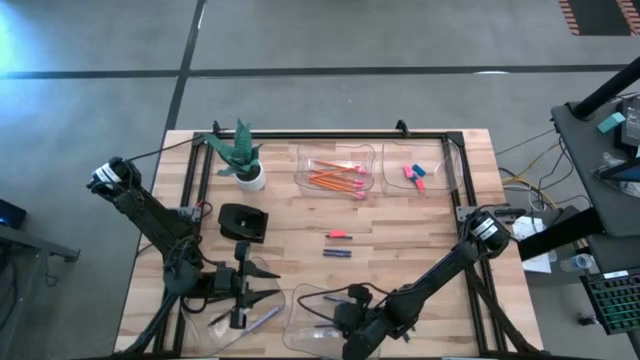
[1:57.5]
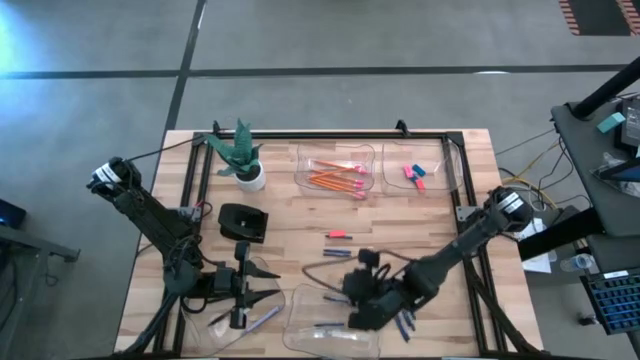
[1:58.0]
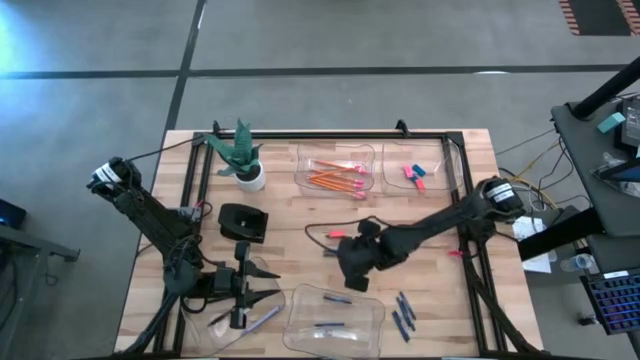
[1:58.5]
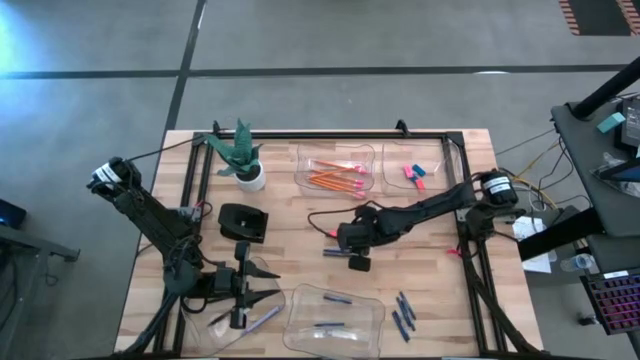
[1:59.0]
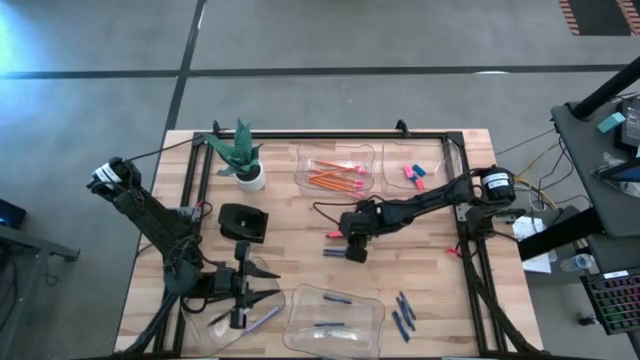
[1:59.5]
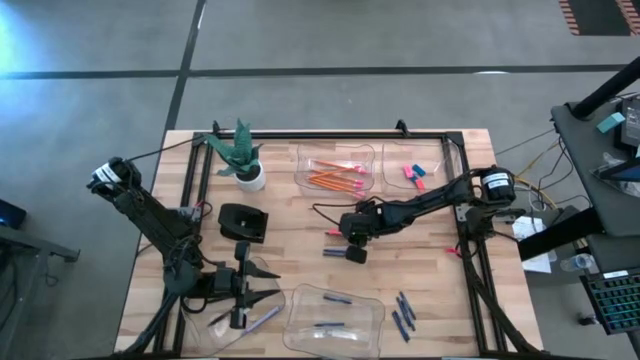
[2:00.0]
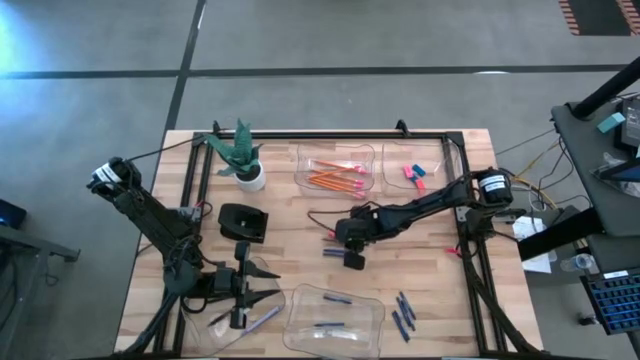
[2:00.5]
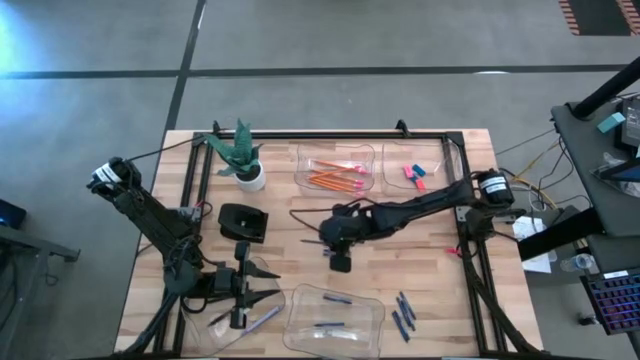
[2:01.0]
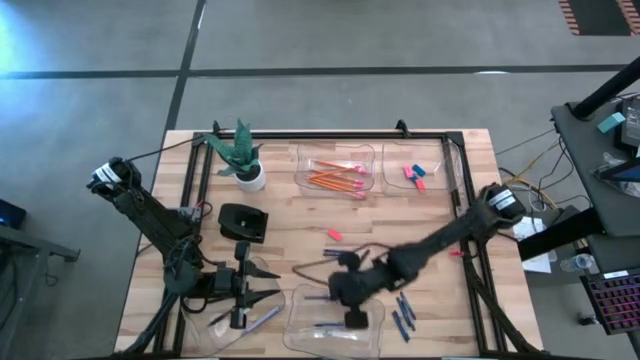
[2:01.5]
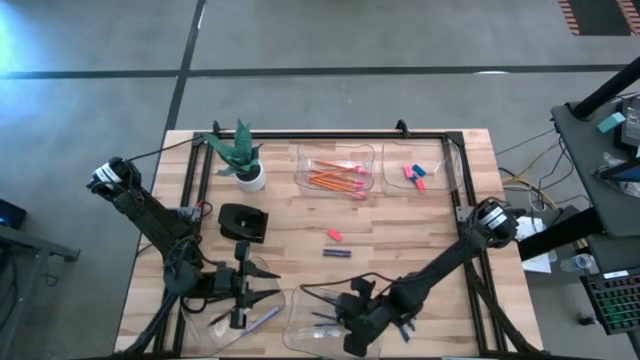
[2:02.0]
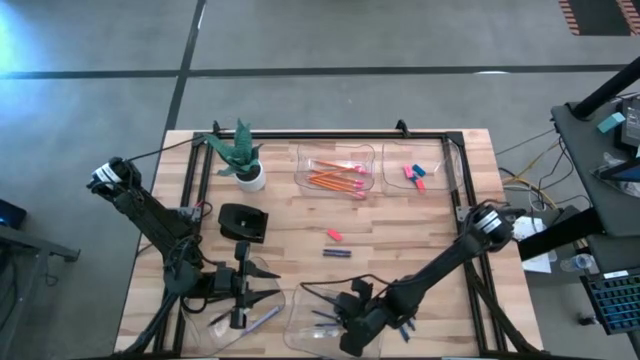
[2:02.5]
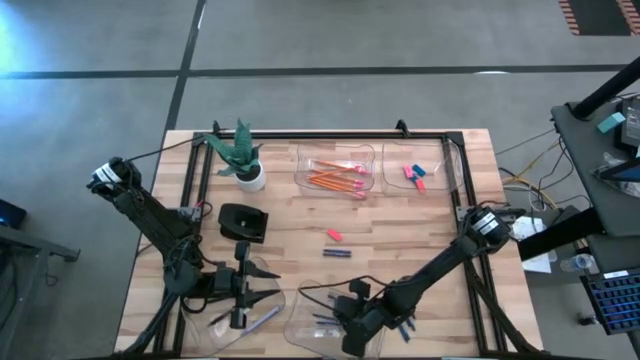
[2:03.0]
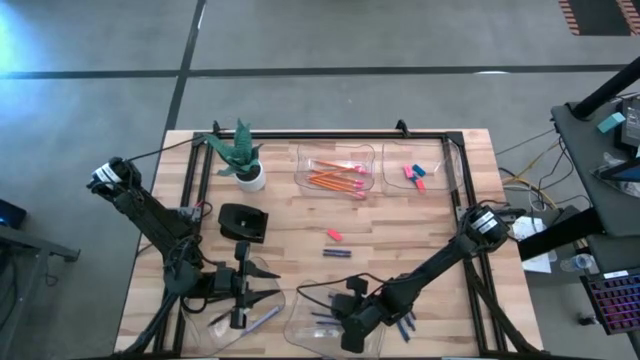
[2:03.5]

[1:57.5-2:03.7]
Task: Sort crayons/erasers/pens/pencils in bins
Put the blue crayon into the bottom right transparent bin

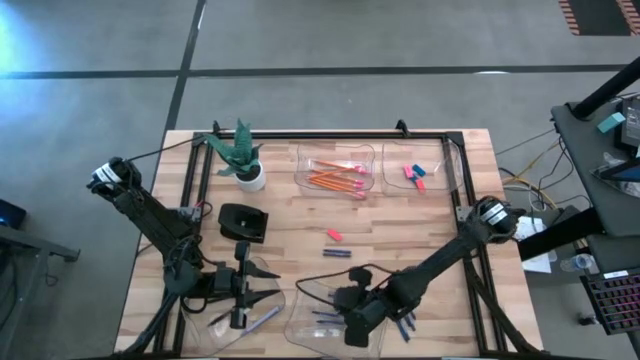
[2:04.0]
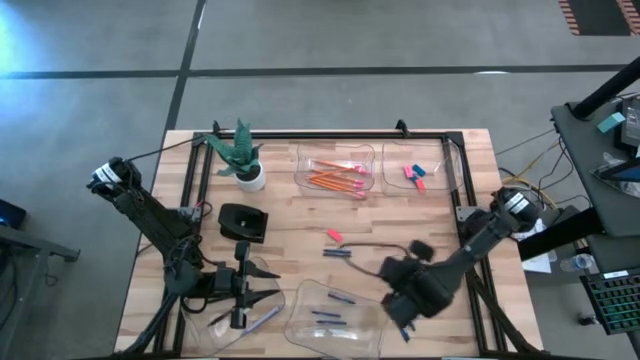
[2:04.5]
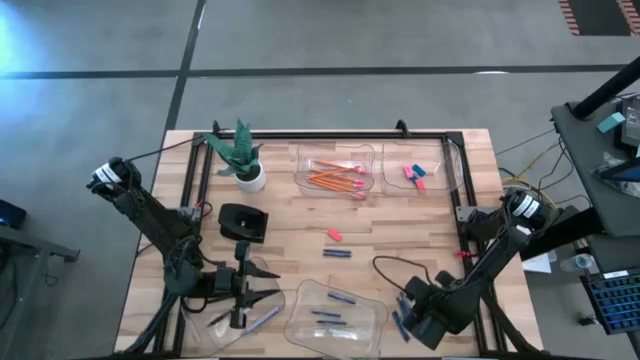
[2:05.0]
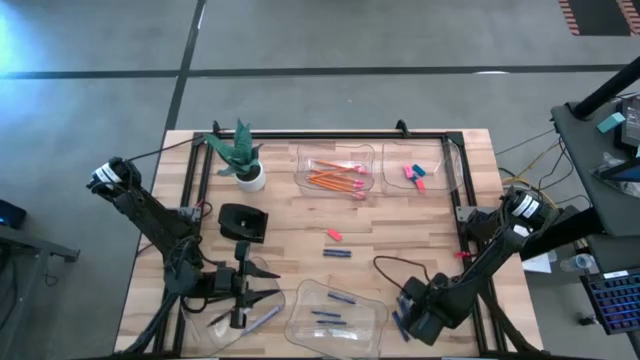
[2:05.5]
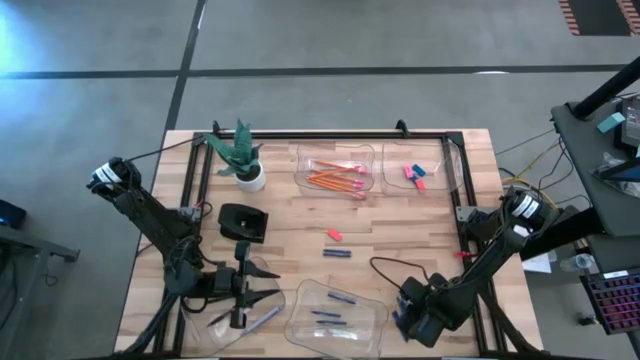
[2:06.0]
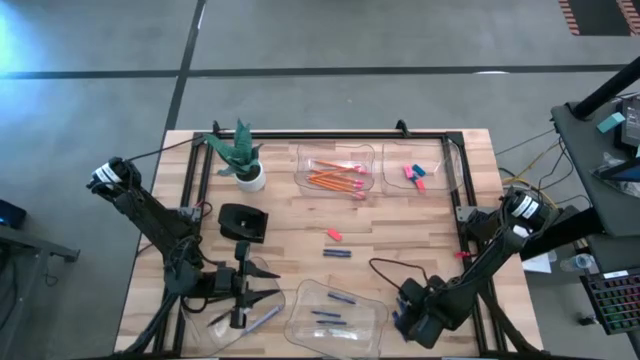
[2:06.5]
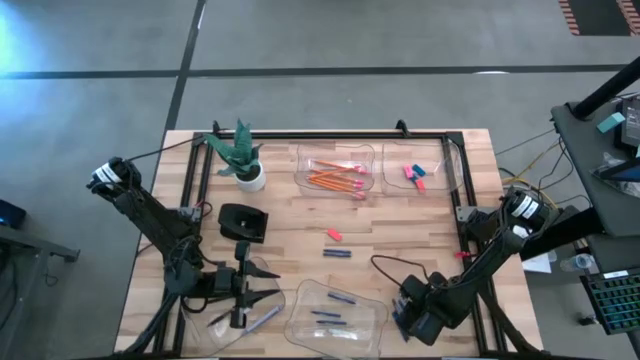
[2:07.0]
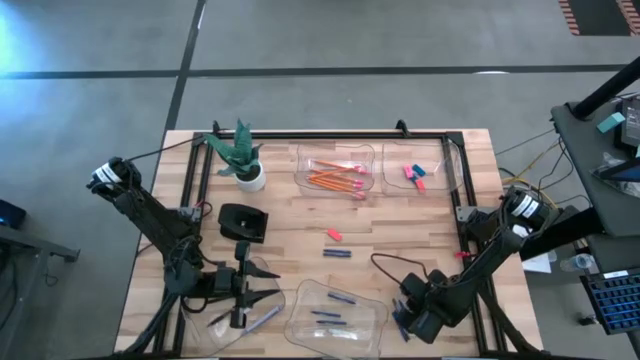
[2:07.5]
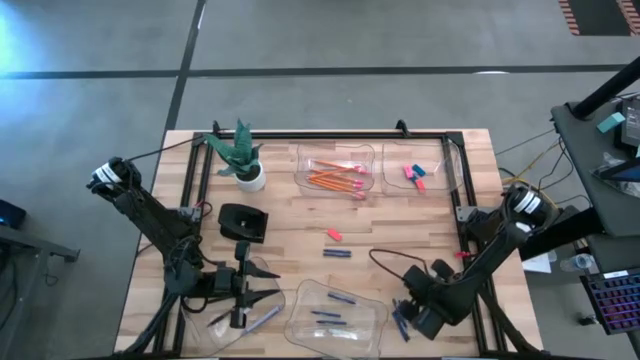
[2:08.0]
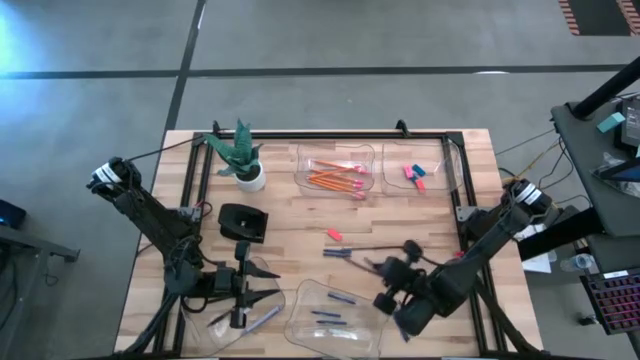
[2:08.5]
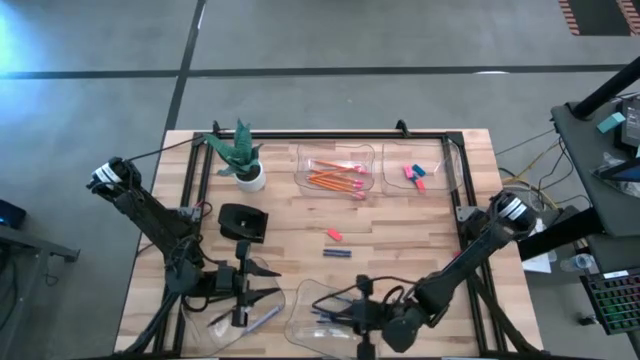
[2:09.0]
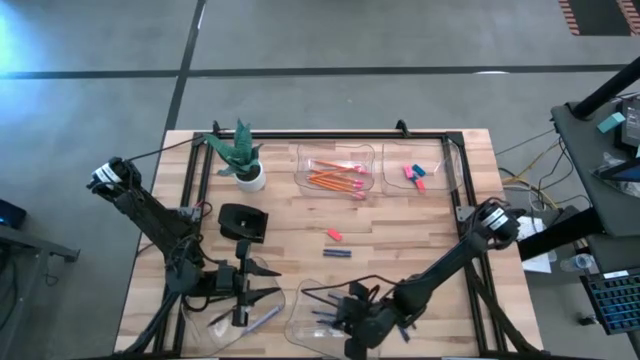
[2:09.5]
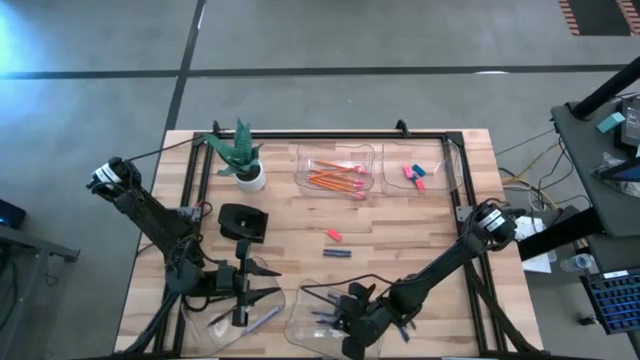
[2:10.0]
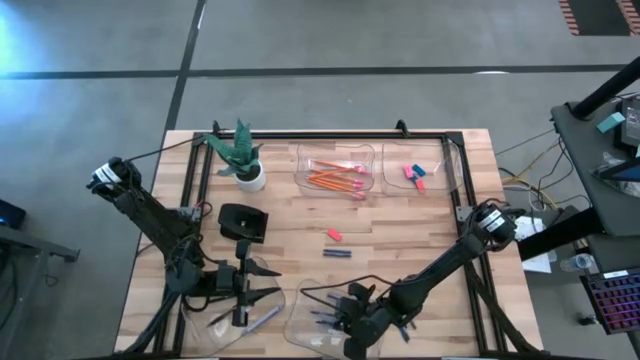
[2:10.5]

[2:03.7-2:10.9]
Put the blue crayon into the bottom right transparent bin

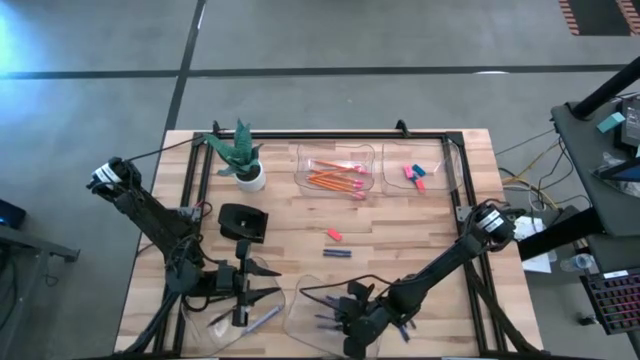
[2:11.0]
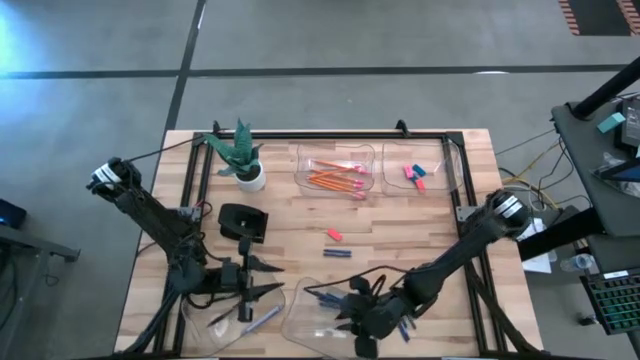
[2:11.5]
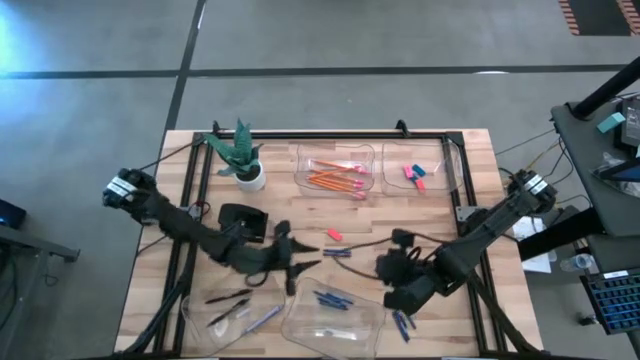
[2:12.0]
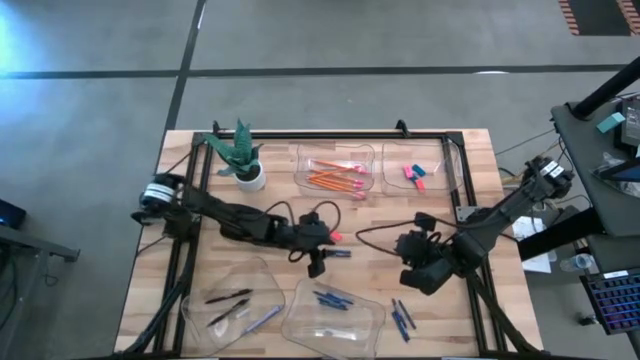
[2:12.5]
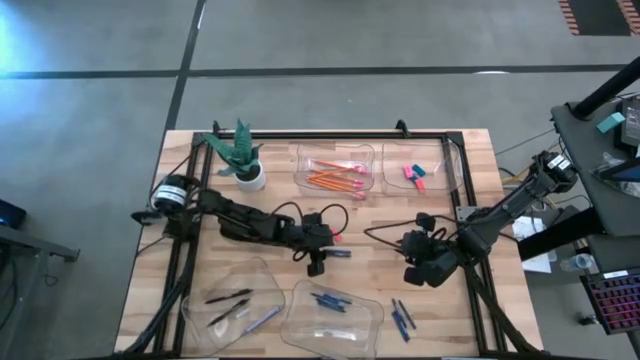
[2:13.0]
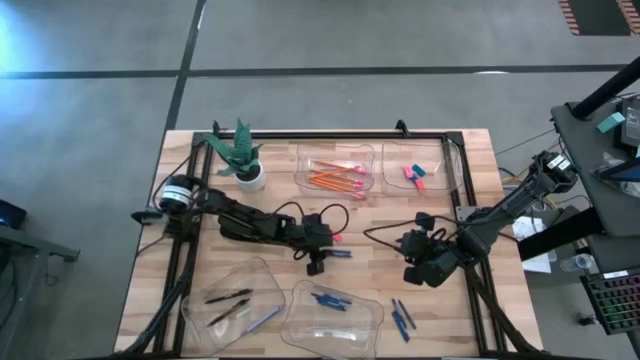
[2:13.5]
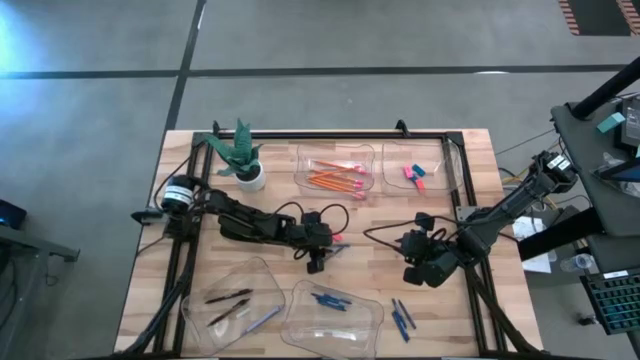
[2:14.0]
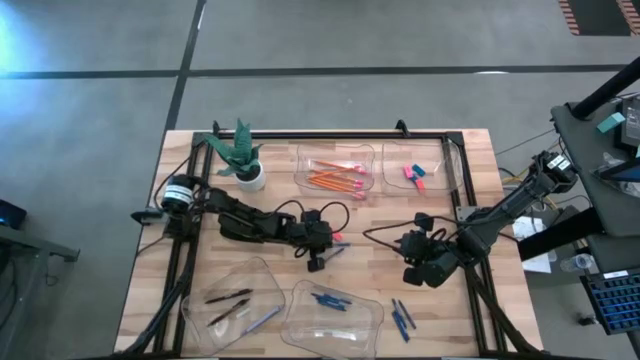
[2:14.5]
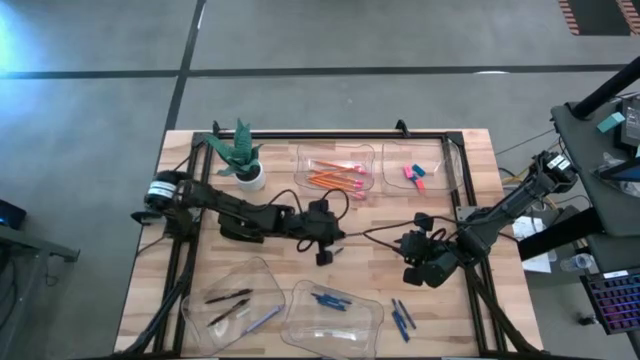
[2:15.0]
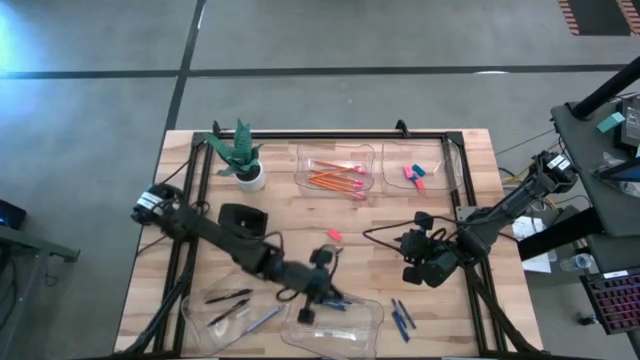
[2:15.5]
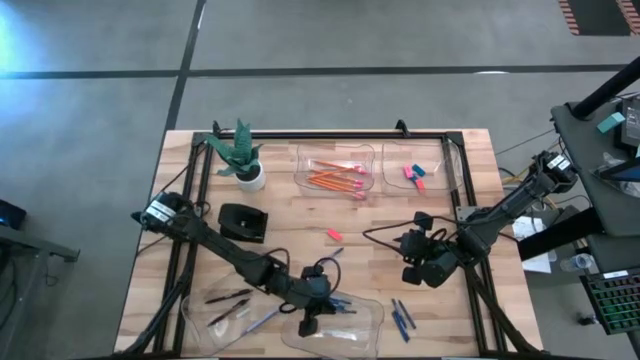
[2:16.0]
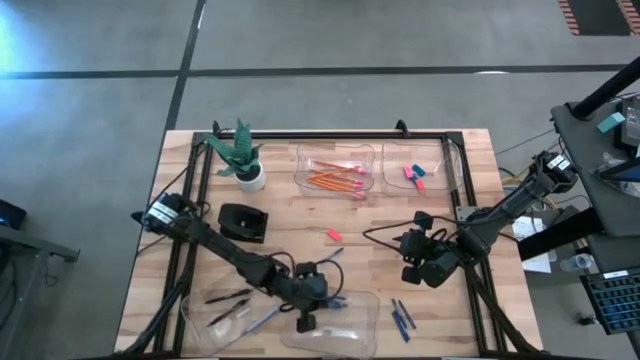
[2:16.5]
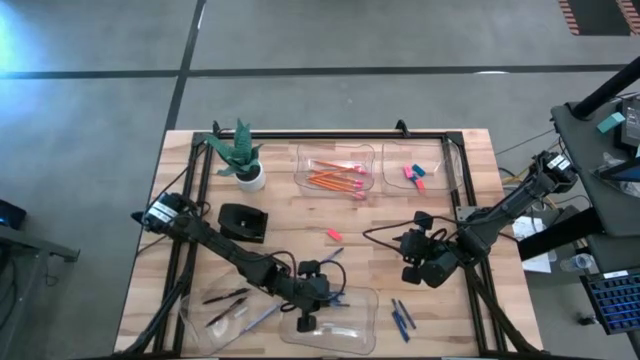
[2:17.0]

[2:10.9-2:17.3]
Put the blue crayon into the bottom right transparent bin

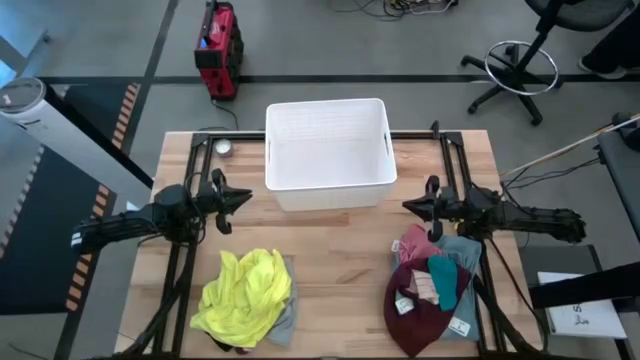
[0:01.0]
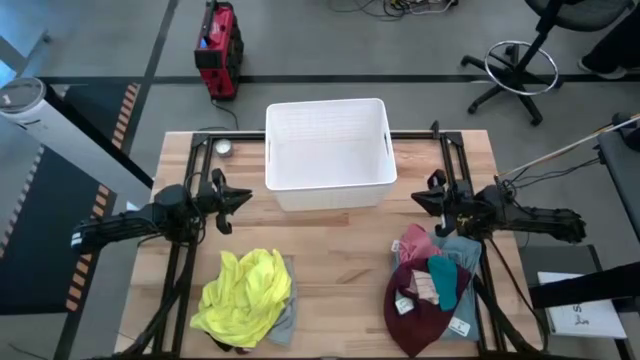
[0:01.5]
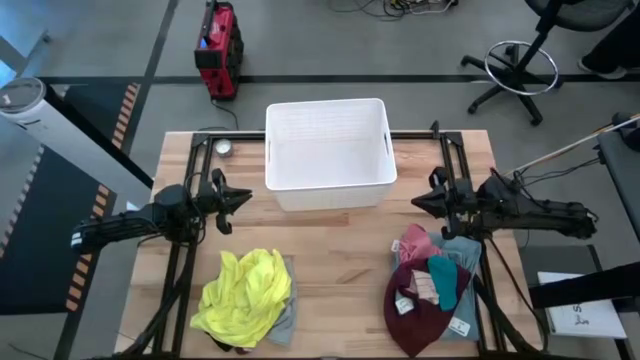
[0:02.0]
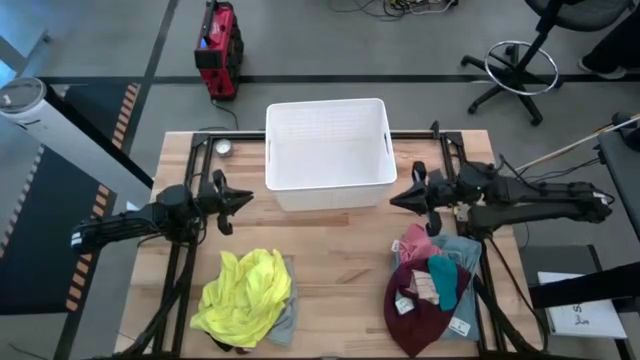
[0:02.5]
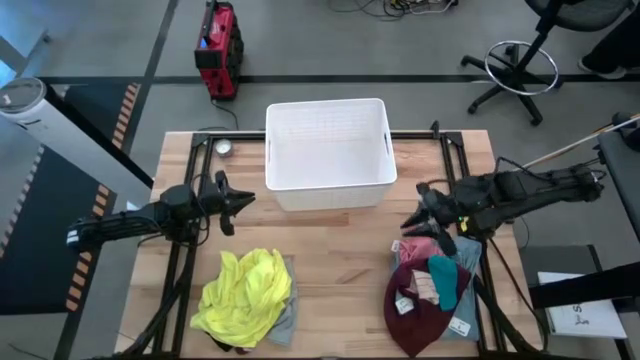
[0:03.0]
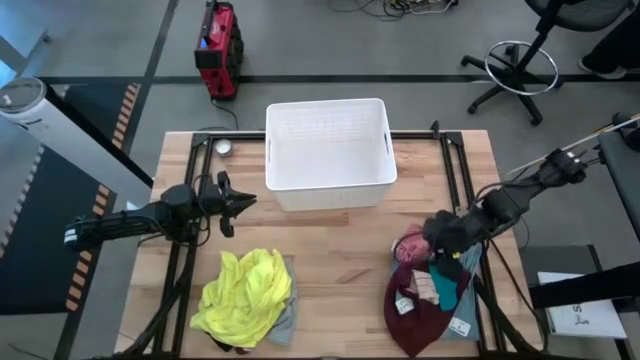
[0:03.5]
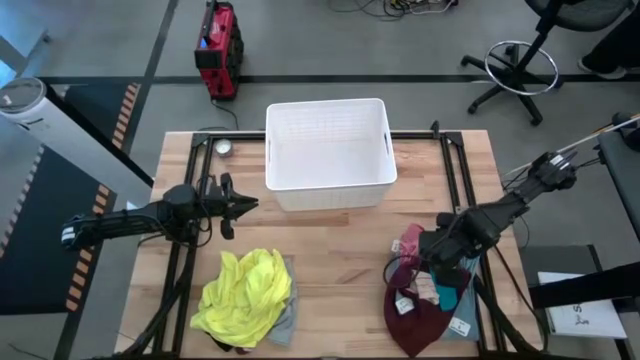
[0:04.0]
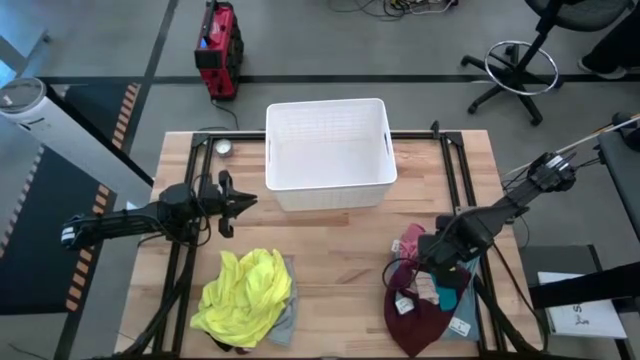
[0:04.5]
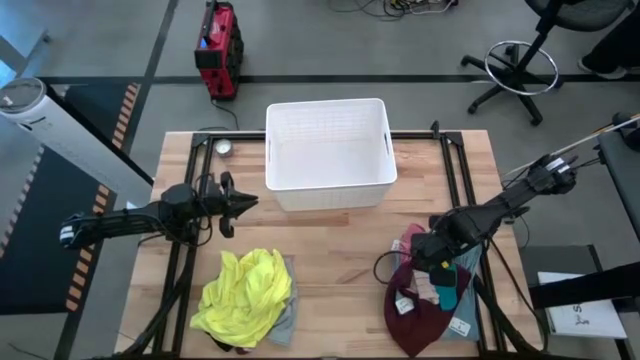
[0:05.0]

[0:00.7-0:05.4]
Task: Sort clothes
Put the blue sock into the white laundry bin
